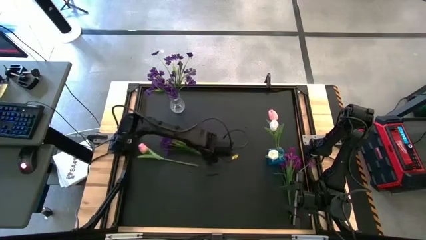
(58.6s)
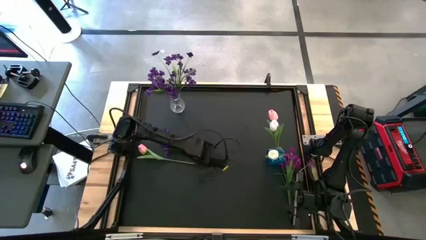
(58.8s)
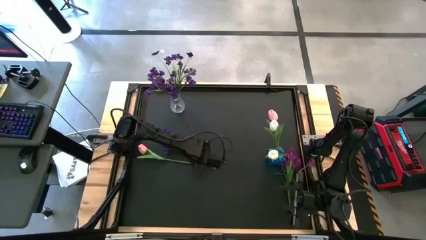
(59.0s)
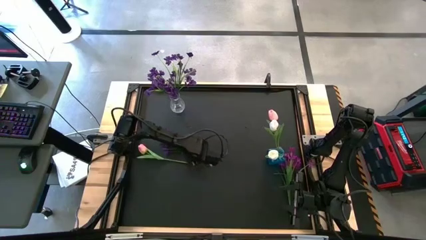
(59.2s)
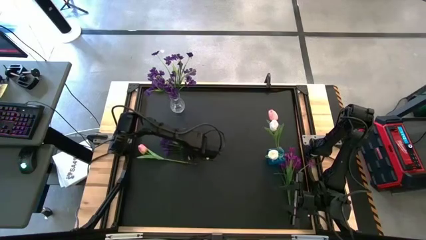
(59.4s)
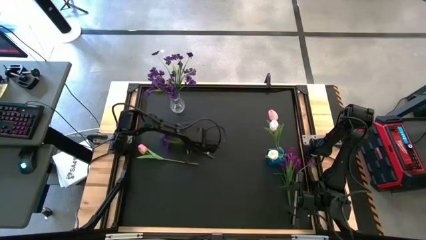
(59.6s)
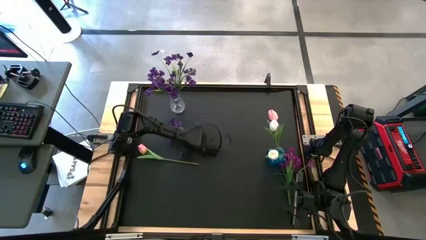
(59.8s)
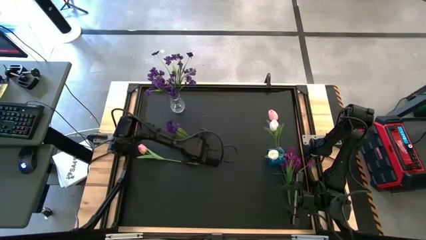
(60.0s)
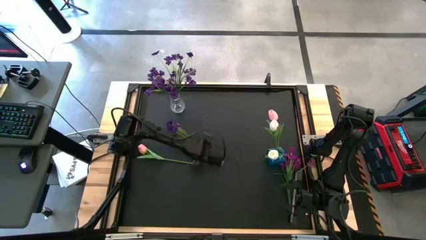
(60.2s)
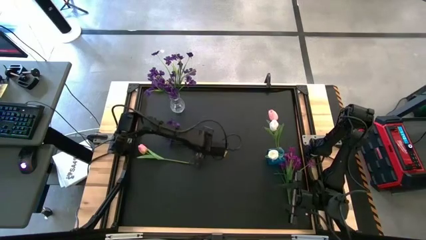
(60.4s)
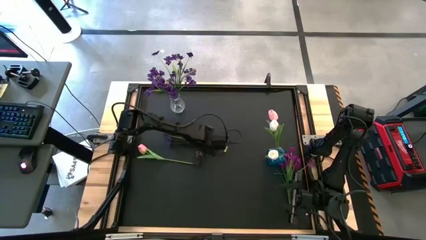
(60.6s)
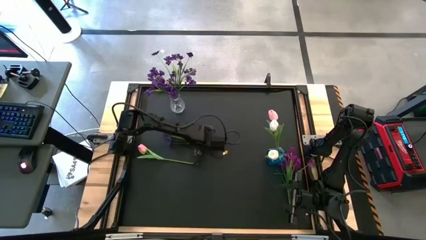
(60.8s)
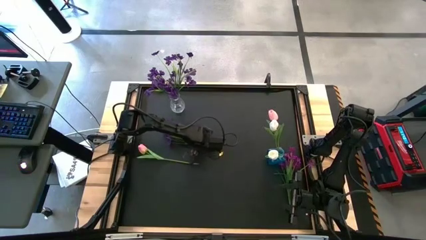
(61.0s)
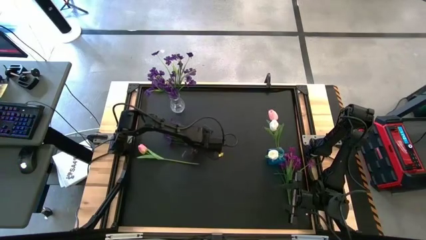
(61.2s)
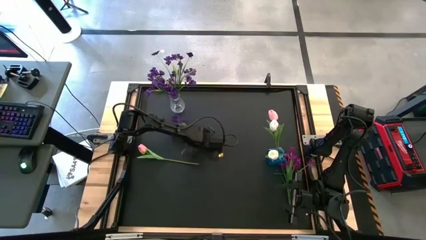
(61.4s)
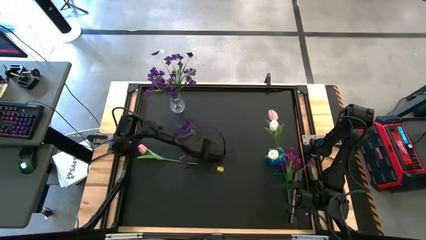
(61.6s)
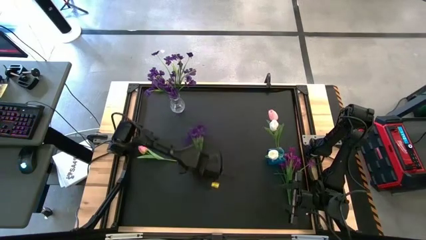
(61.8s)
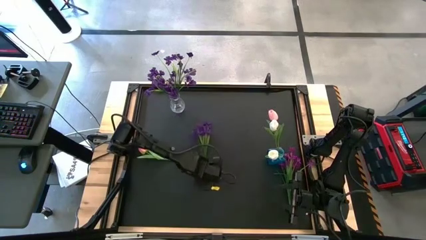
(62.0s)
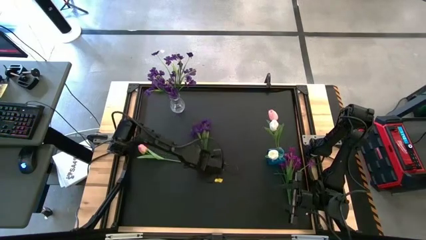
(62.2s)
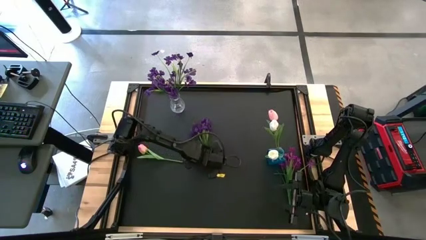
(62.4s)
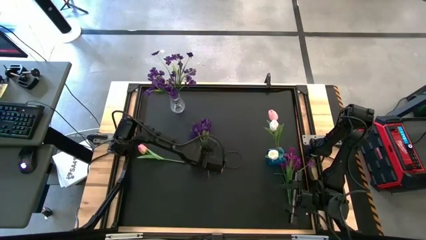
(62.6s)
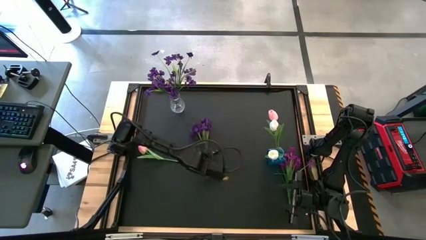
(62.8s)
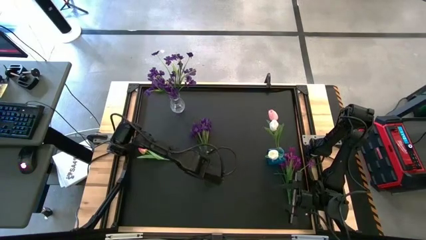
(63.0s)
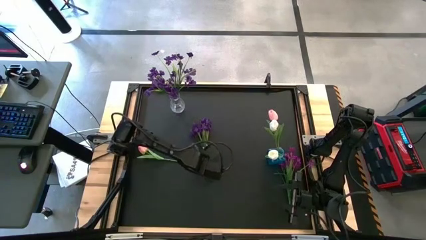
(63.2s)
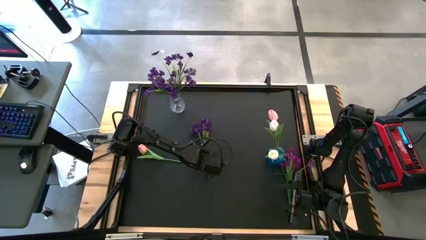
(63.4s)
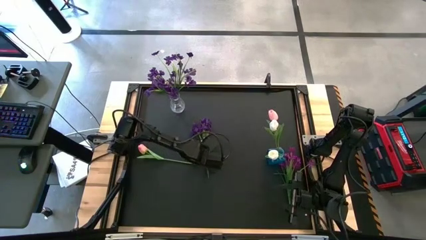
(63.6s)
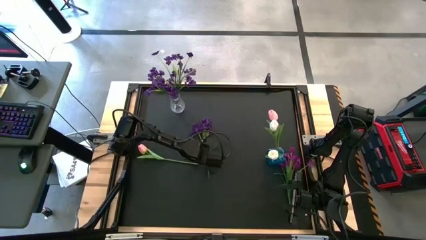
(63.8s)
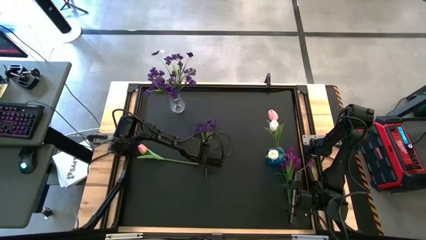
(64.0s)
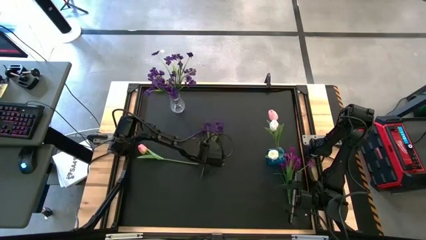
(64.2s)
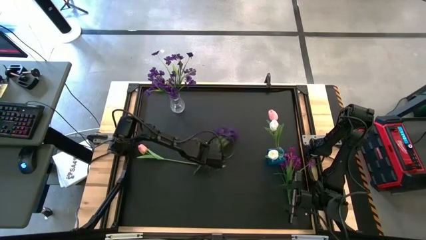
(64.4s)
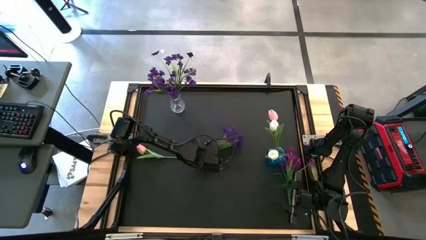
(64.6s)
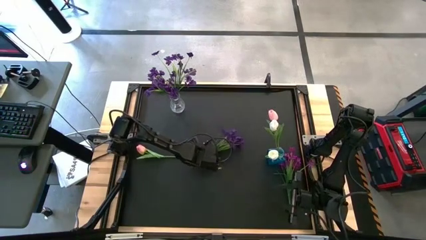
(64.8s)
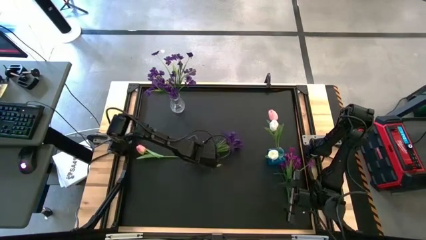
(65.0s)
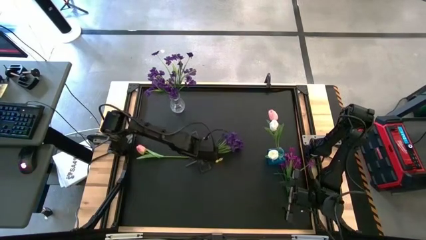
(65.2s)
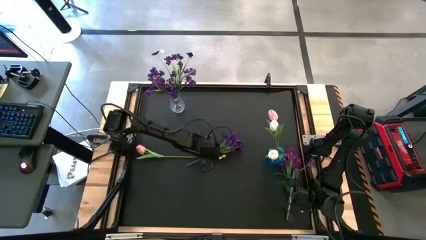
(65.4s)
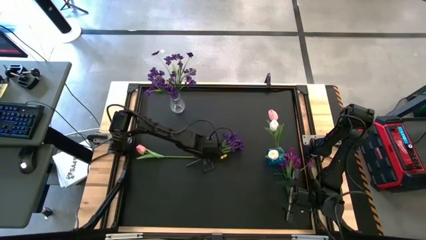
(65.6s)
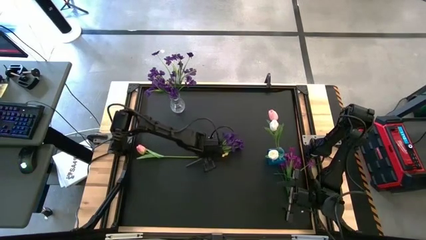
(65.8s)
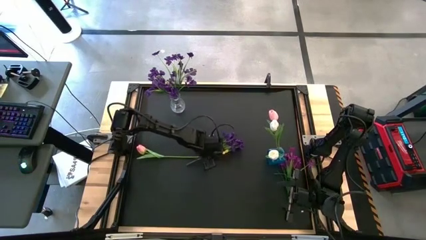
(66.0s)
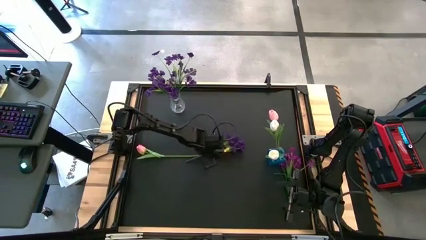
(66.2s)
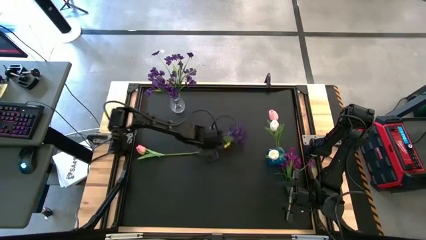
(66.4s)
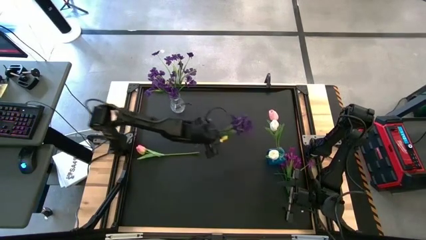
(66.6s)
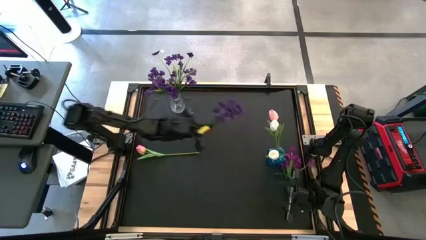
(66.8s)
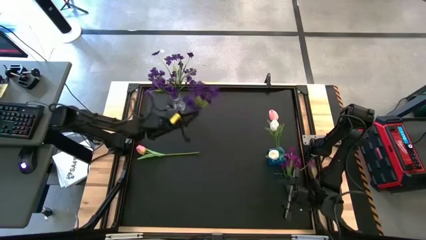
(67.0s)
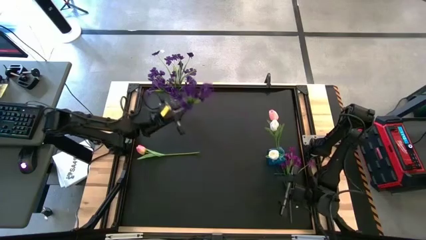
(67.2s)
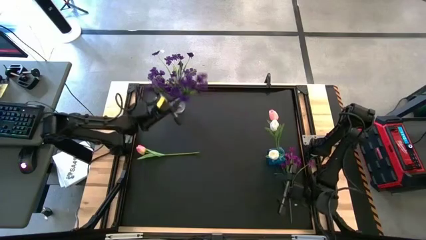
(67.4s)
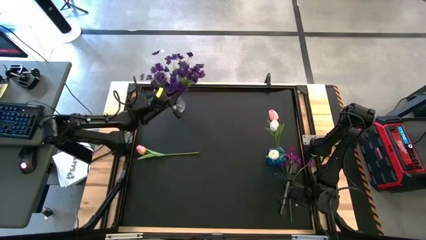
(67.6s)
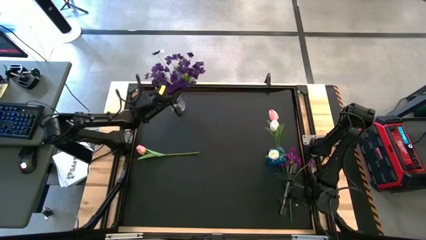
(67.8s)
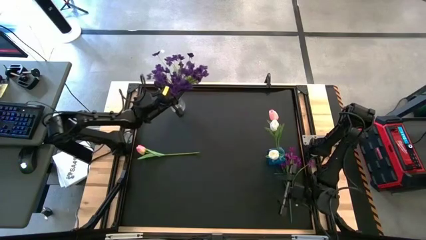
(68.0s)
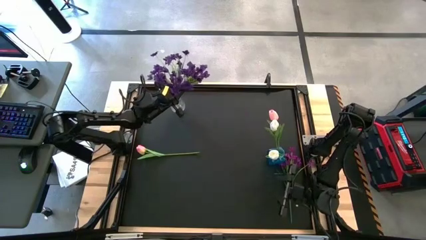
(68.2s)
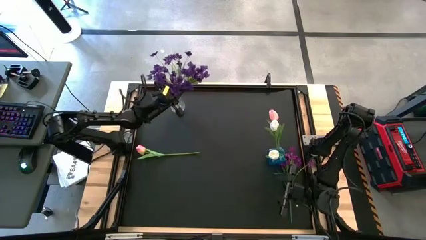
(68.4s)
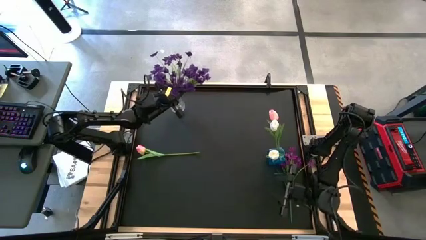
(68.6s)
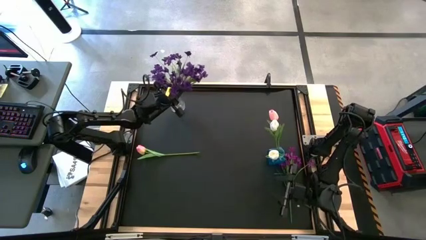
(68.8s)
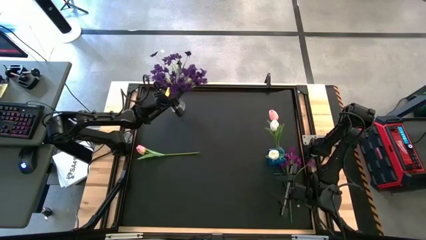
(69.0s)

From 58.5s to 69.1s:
Task: Sort flowers into vase by color
Put the violet flowers into the transparent white vase

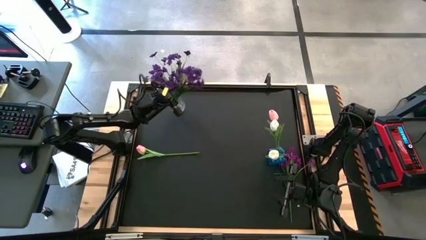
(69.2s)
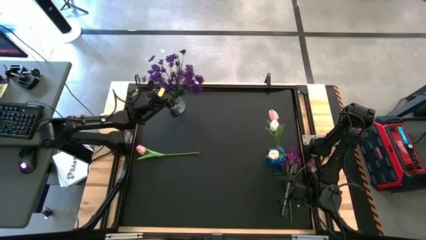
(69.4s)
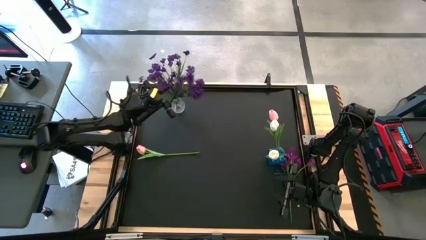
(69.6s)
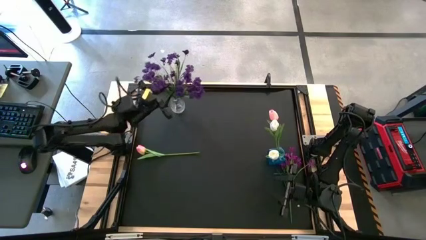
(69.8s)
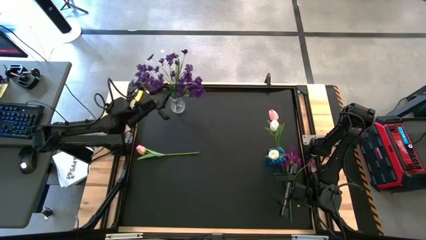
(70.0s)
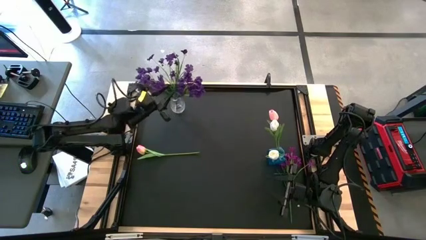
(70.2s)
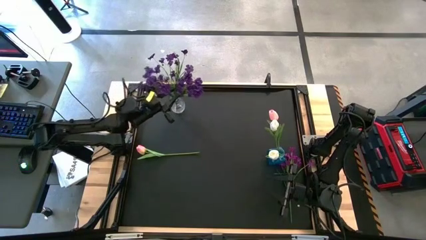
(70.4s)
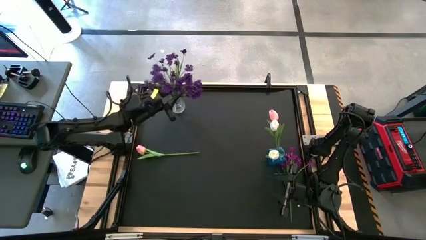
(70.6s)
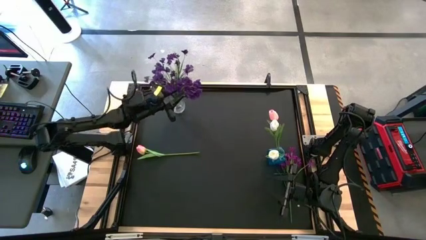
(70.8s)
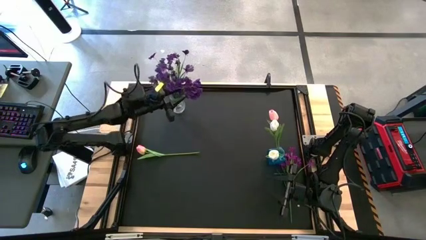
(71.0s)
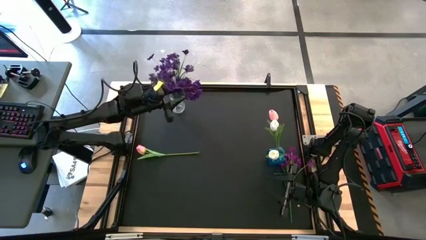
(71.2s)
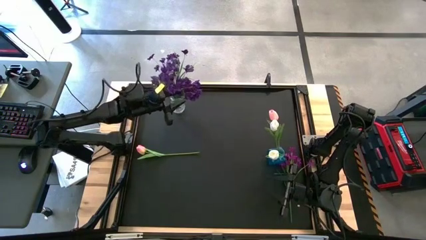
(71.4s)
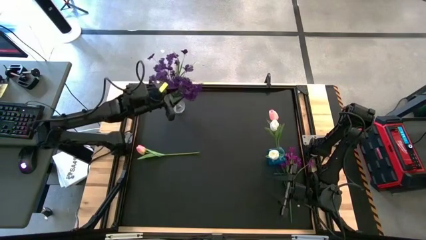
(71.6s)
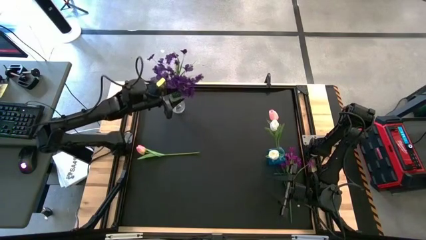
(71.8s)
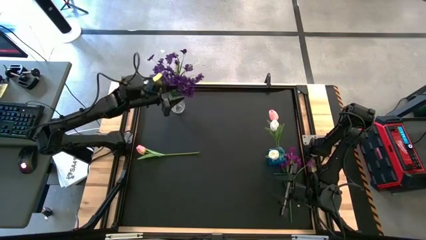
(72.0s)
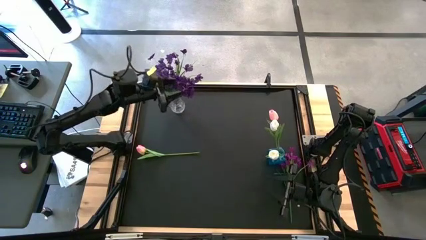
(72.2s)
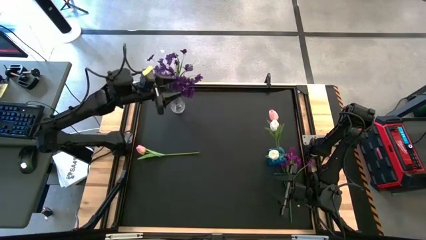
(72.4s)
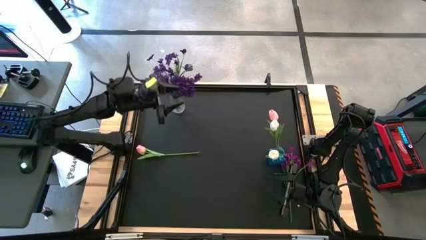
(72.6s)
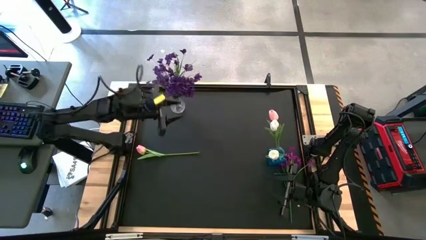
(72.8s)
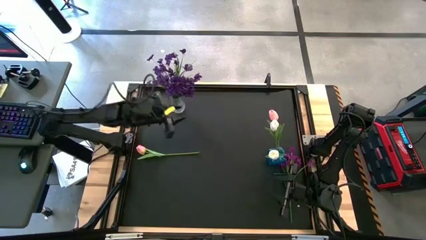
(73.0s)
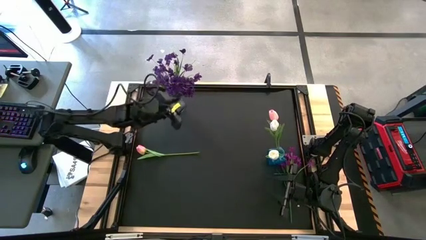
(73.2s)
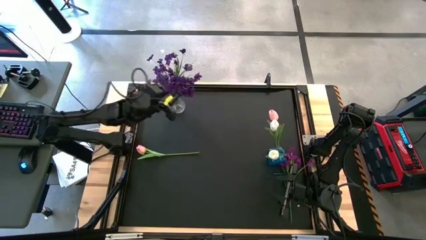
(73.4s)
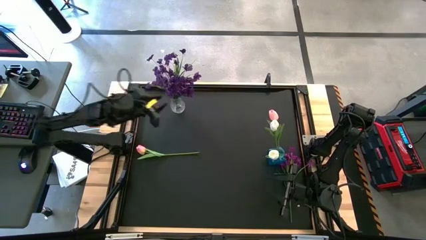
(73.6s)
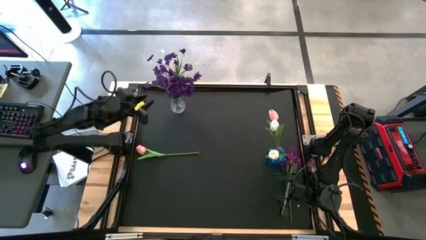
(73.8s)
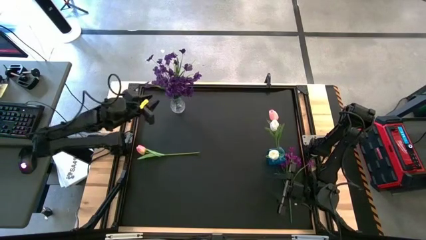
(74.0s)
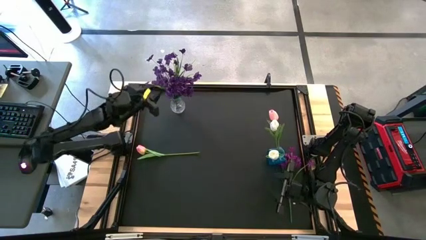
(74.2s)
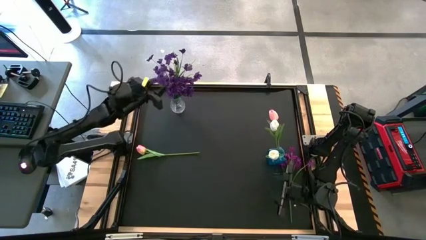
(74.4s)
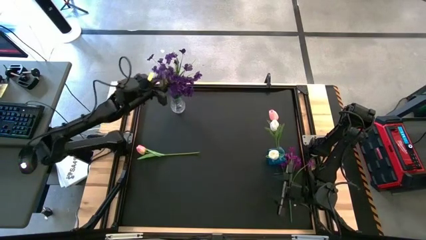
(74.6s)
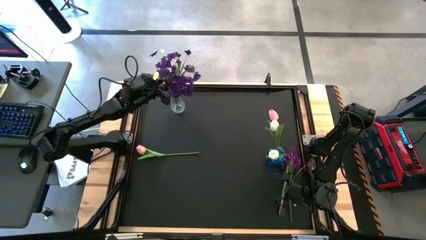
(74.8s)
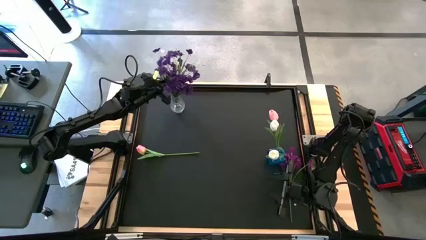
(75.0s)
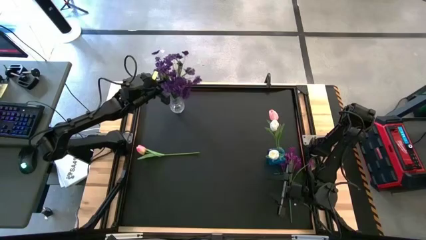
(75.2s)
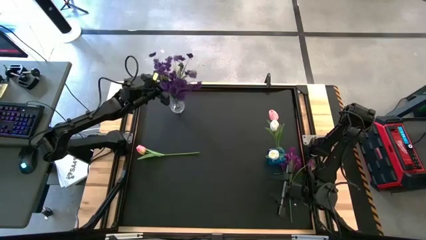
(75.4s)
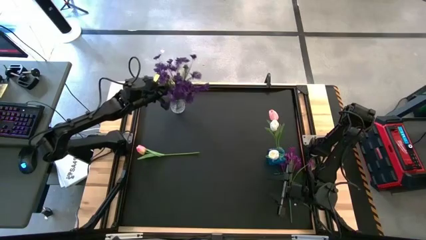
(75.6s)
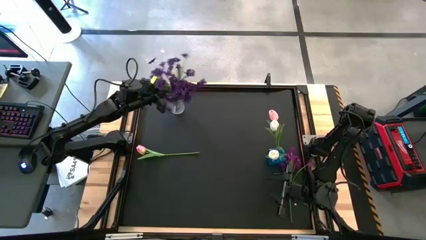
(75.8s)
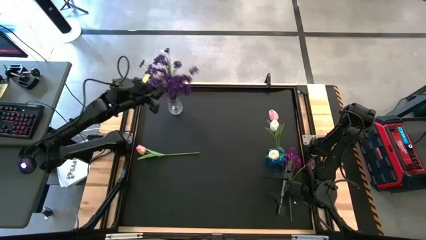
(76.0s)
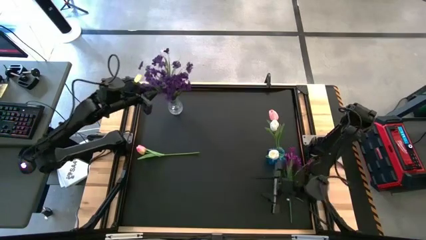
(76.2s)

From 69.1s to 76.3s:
Adjust the violet flowers
